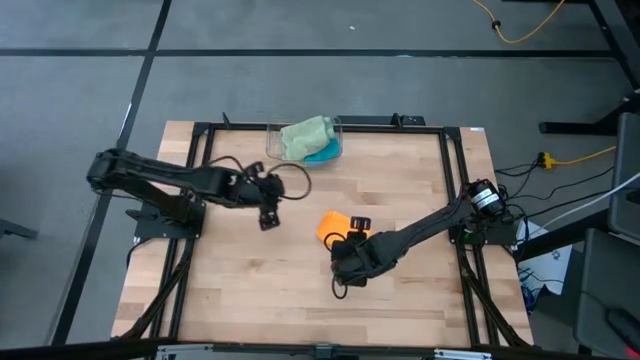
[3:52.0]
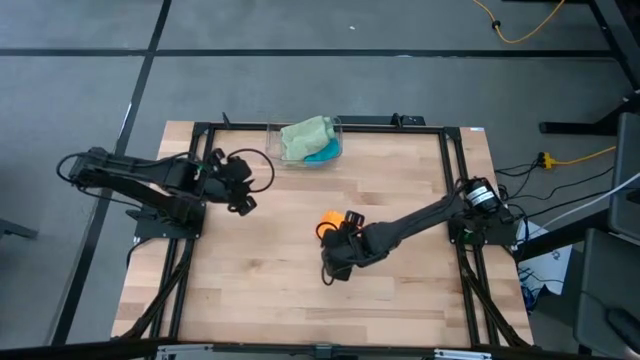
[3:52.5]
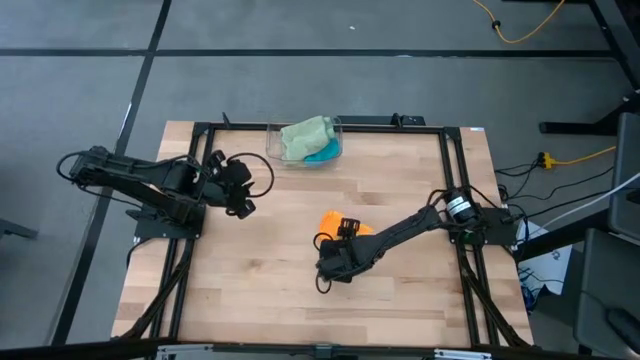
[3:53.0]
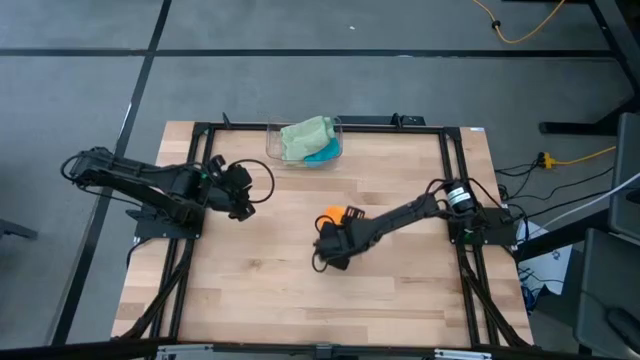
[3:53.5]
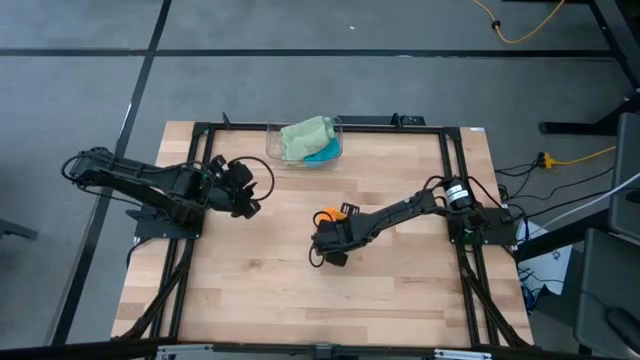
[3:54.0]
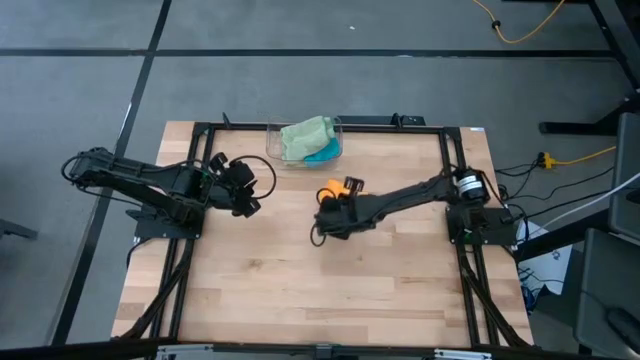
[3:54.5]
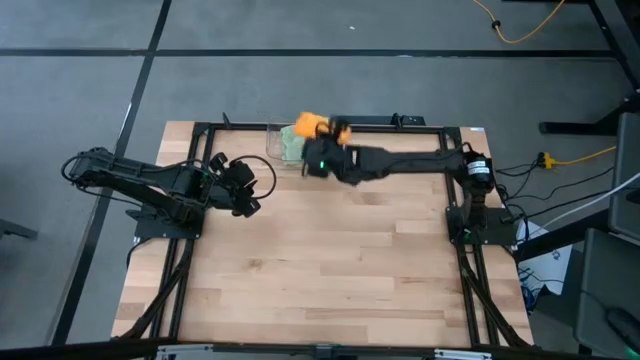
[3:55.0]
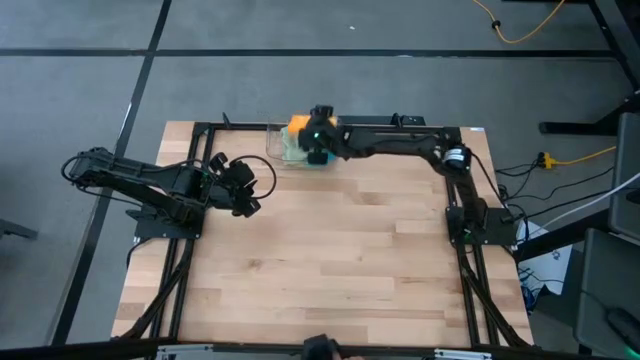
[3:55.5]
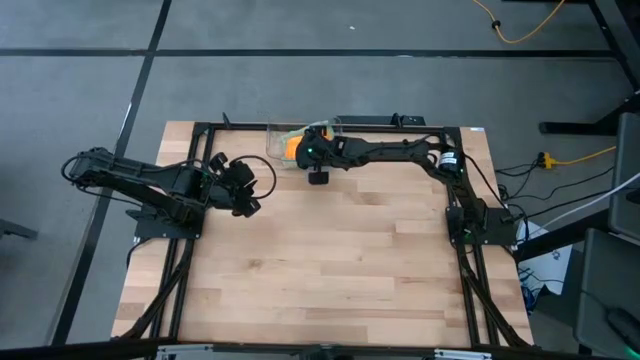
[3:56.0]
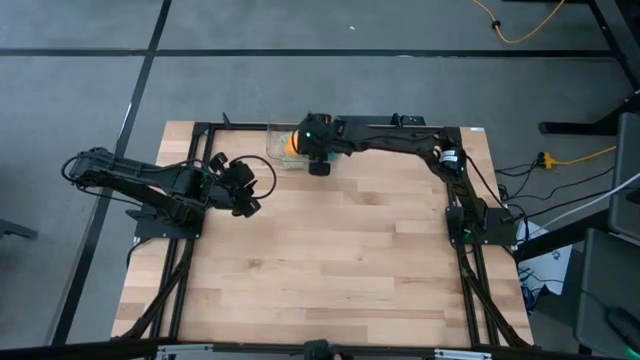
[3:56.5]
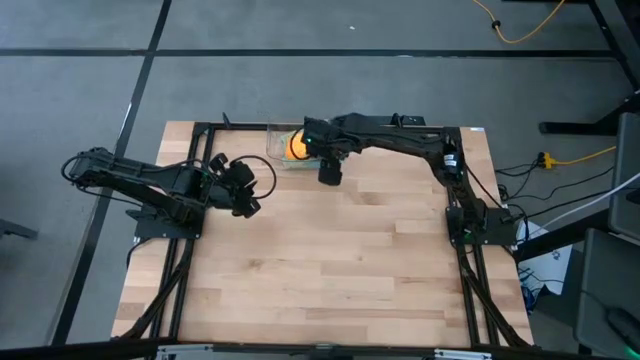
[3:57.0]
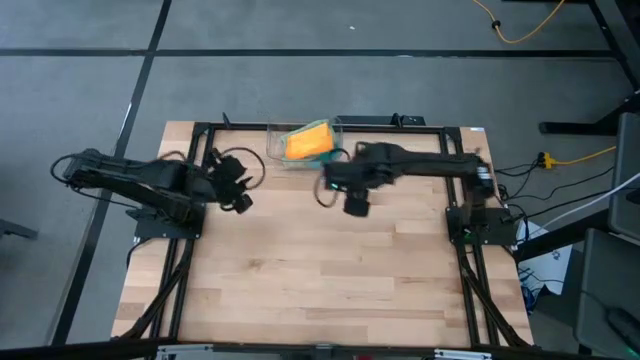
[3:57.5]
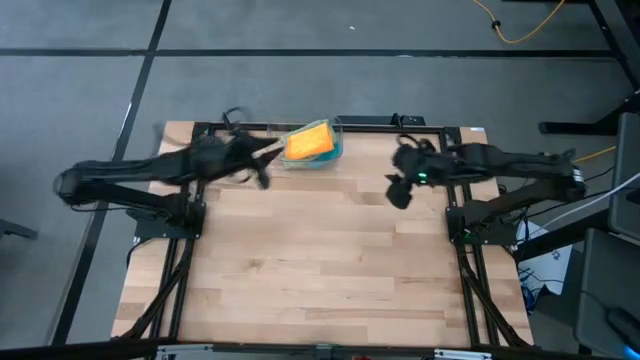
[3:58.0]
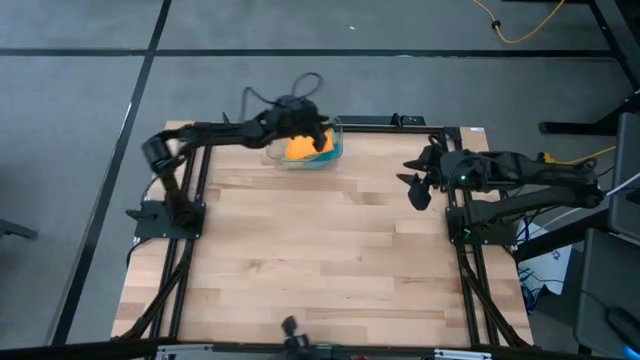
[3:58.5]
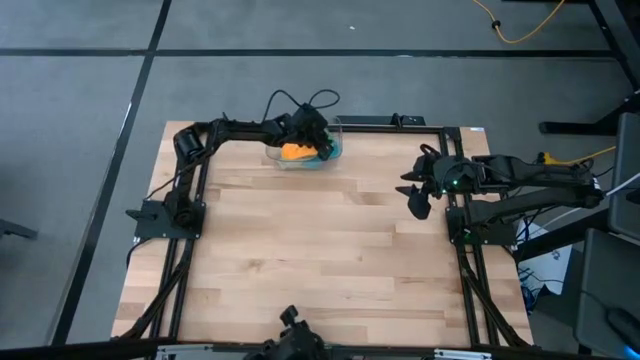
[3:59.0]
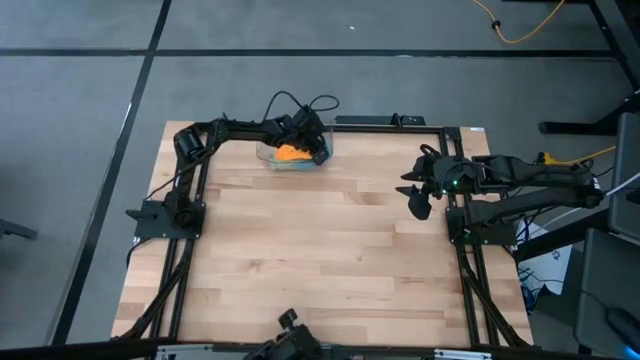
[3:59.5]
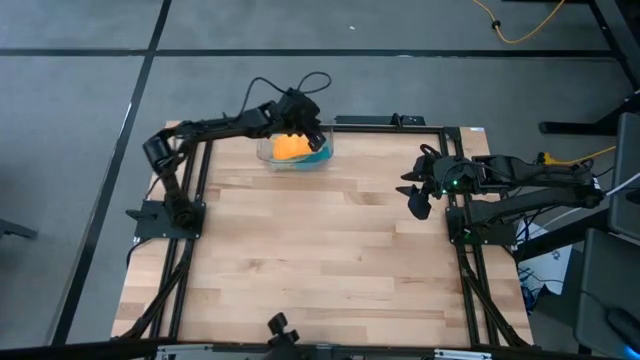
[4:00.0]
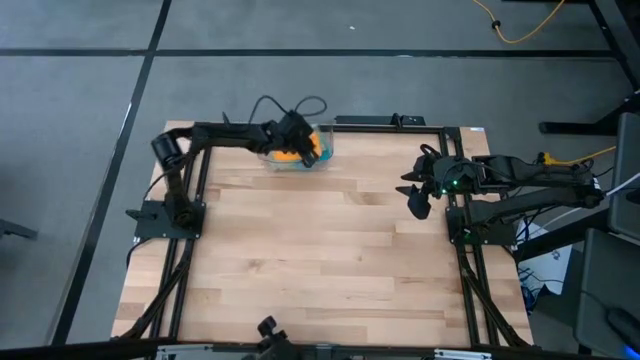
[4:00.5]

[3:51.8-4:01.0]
Task: Fold microfiber towels
Put the orange towel on top of the green towel on the transparent bin

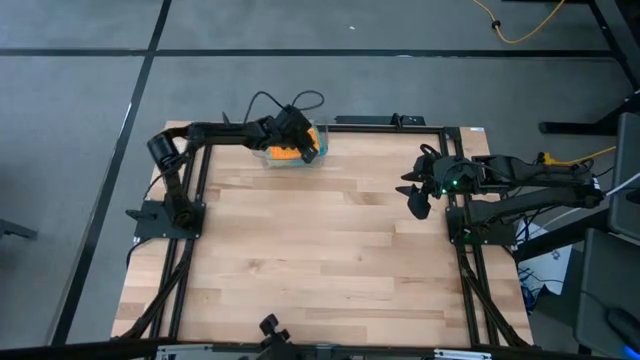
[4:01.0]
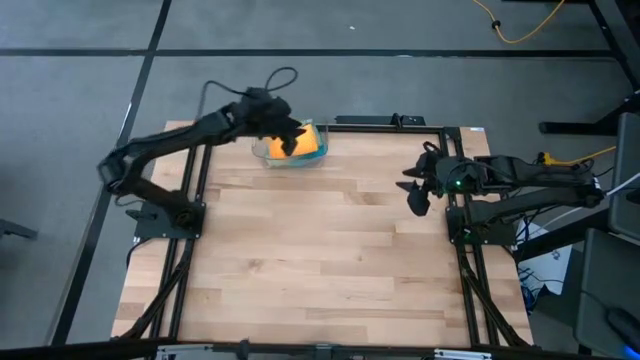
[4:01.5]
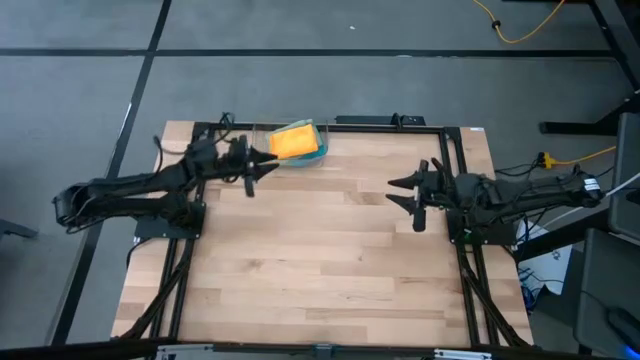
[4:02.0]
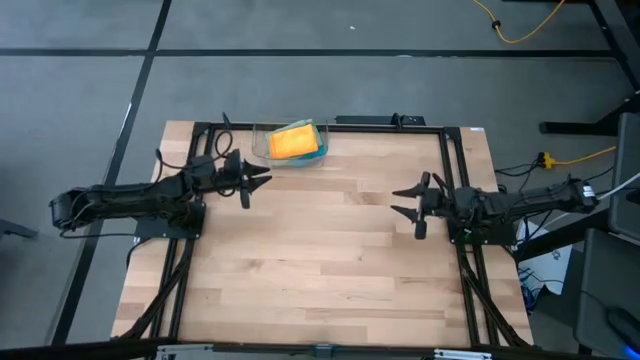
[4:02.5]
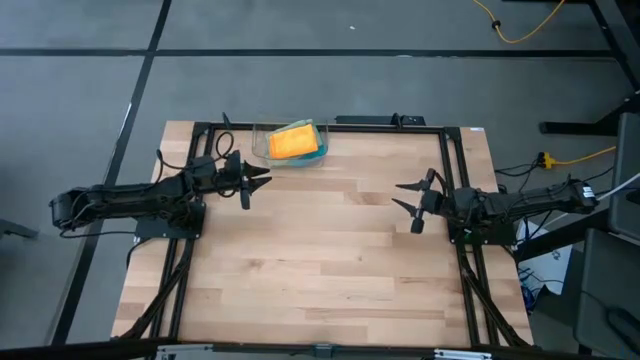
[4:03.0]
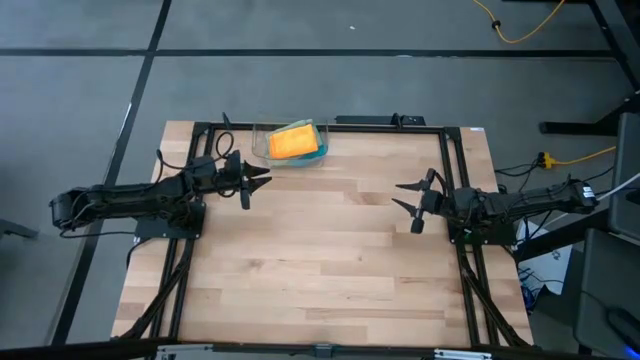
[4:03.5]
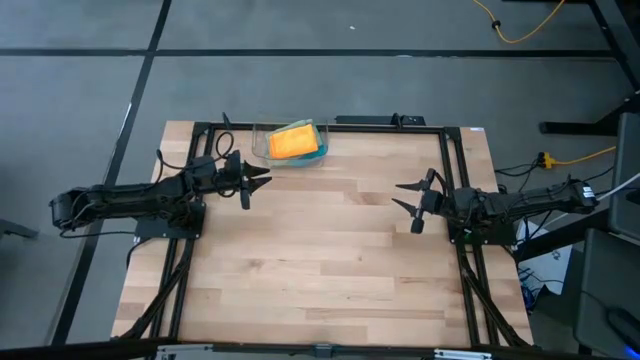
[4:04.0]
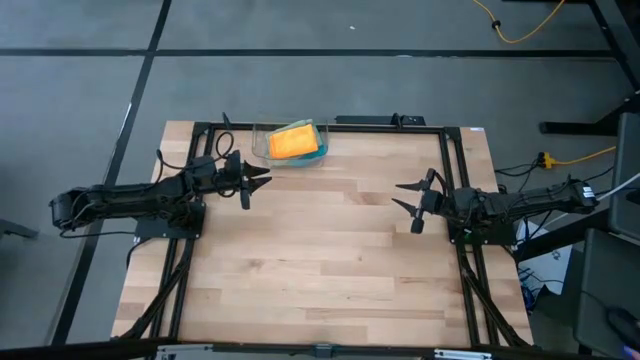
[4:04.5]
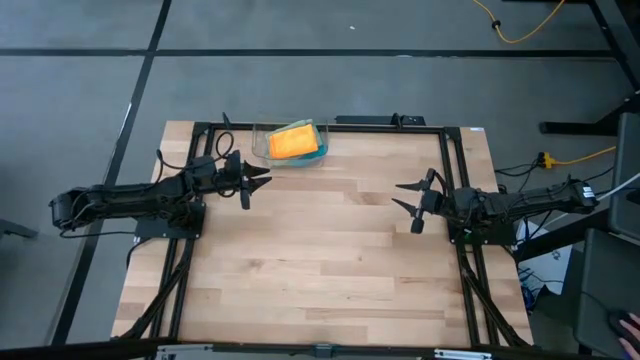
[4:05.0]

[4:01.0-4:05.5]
Return to home position

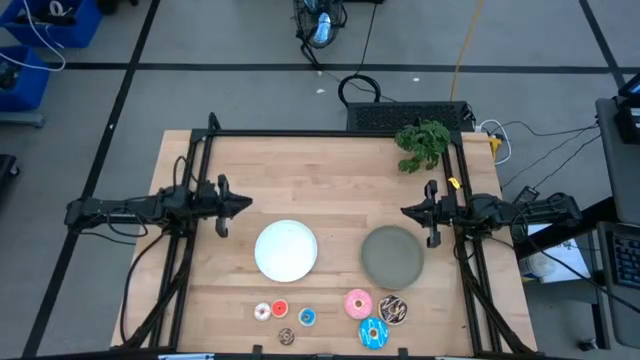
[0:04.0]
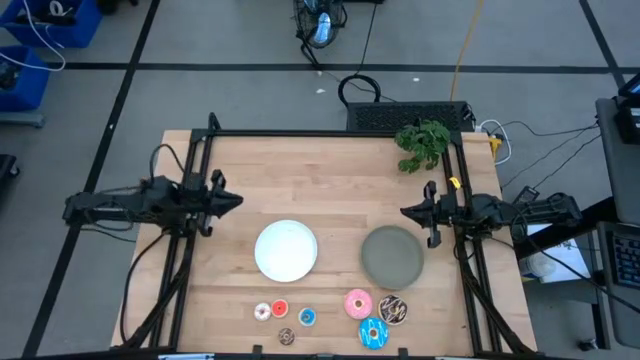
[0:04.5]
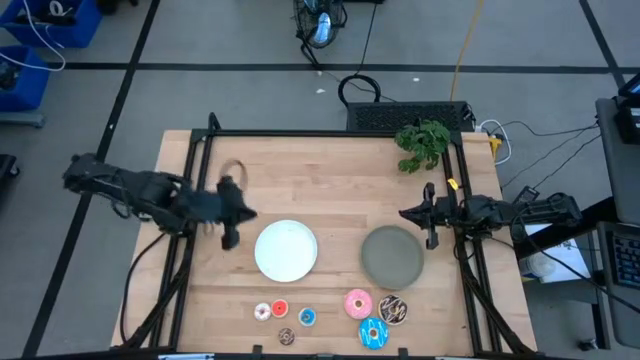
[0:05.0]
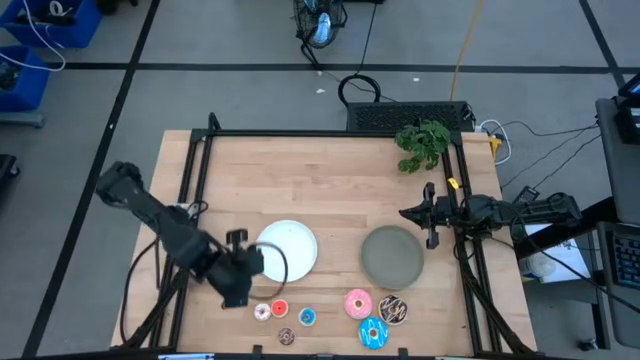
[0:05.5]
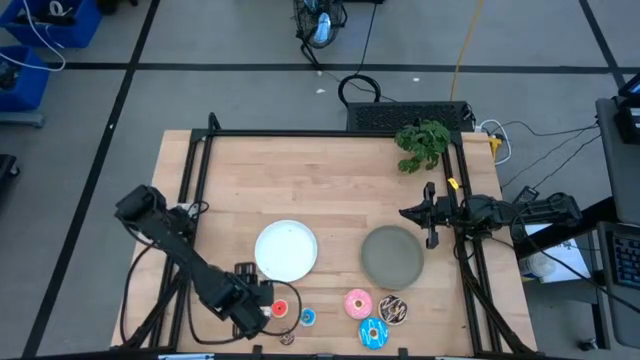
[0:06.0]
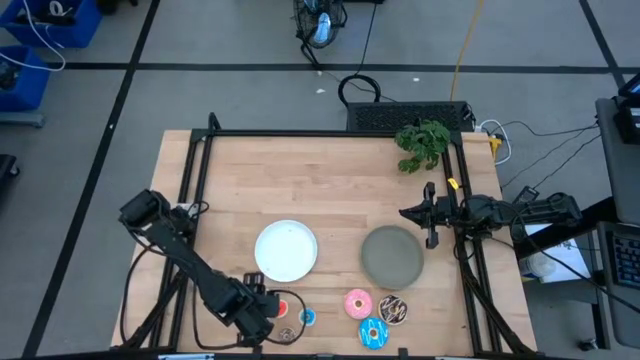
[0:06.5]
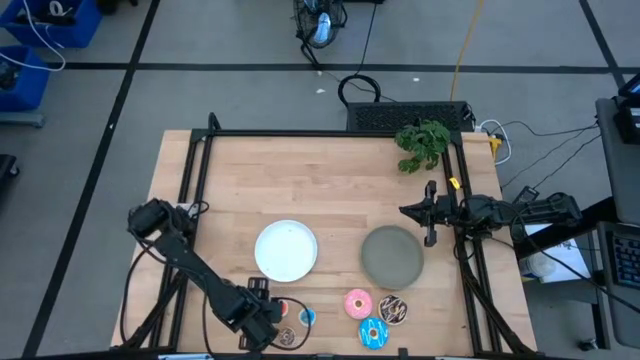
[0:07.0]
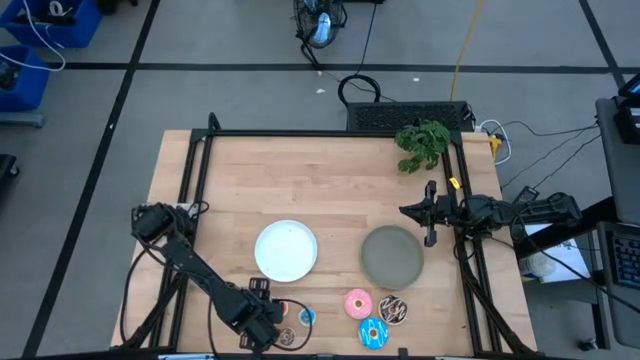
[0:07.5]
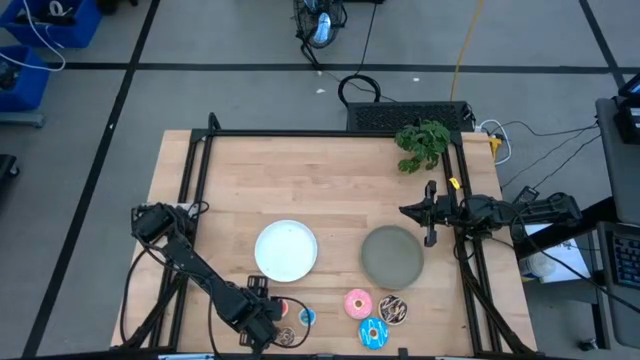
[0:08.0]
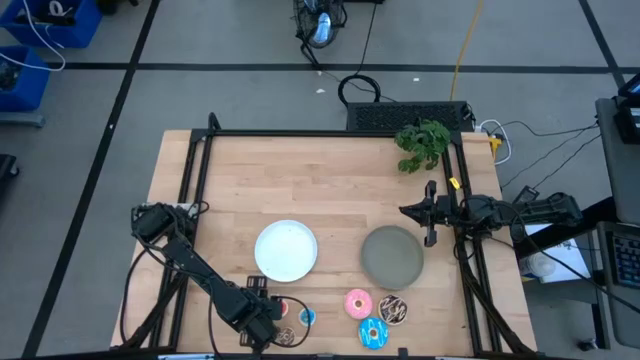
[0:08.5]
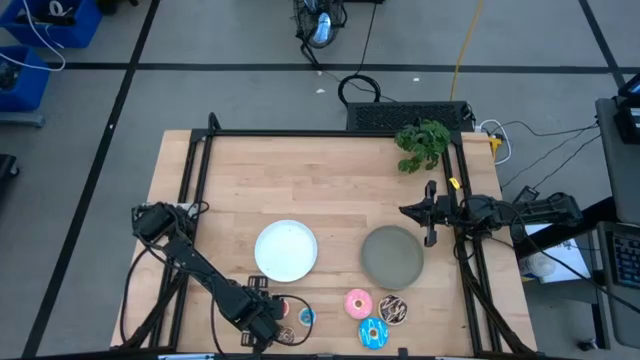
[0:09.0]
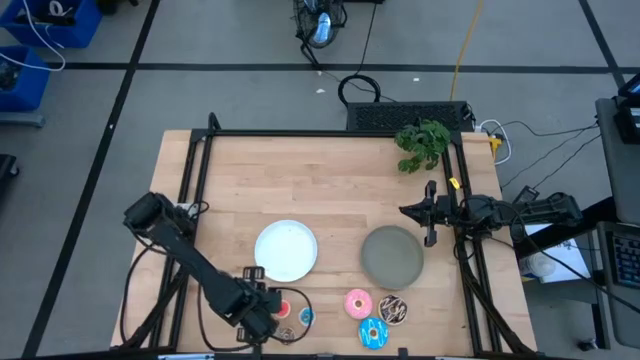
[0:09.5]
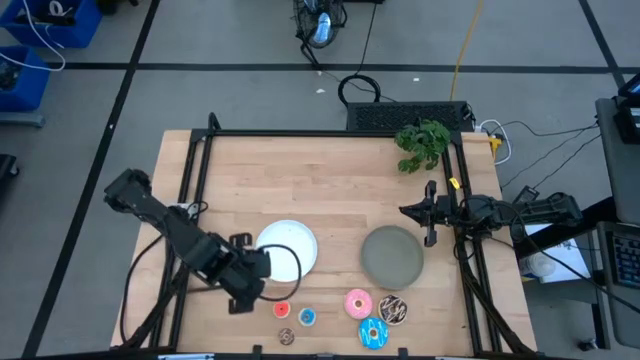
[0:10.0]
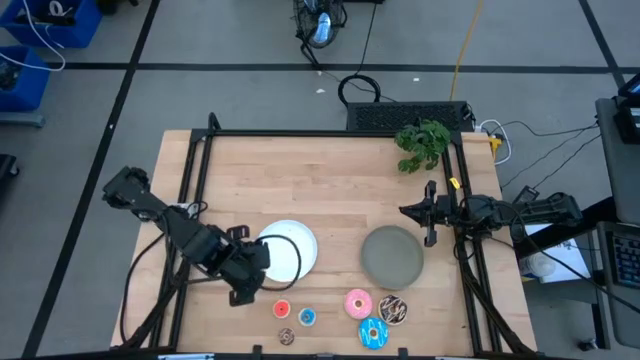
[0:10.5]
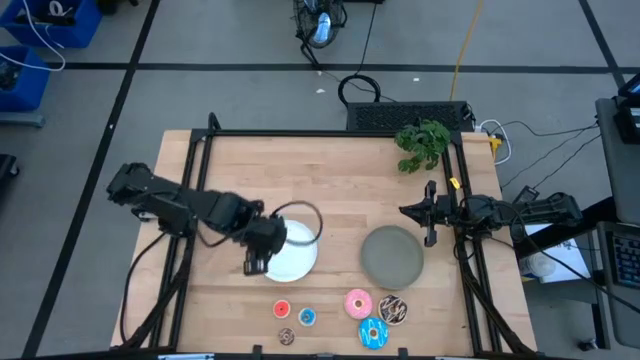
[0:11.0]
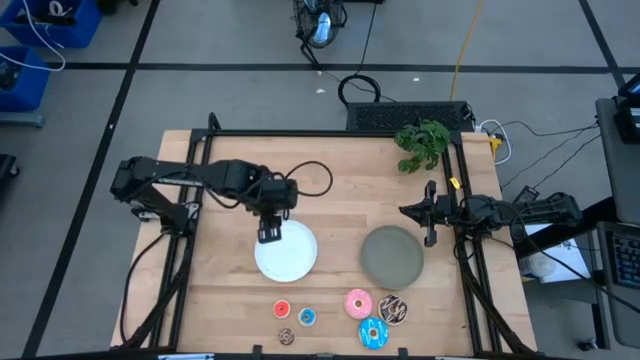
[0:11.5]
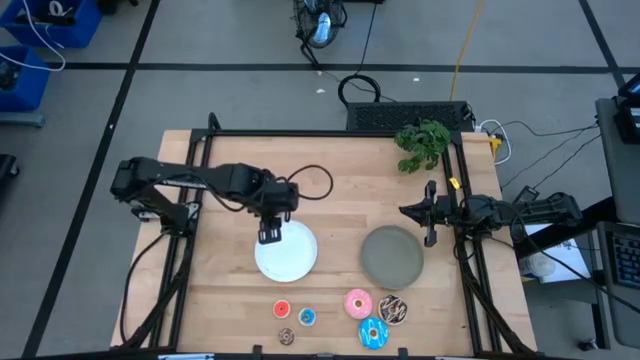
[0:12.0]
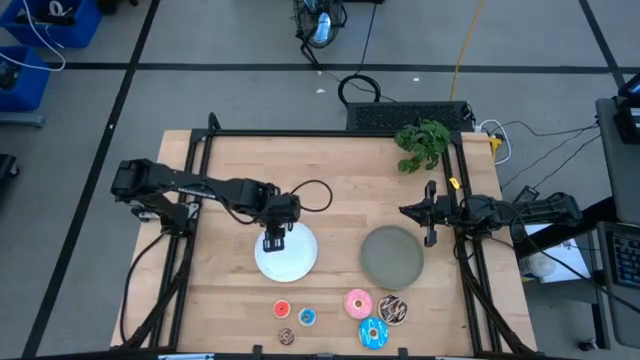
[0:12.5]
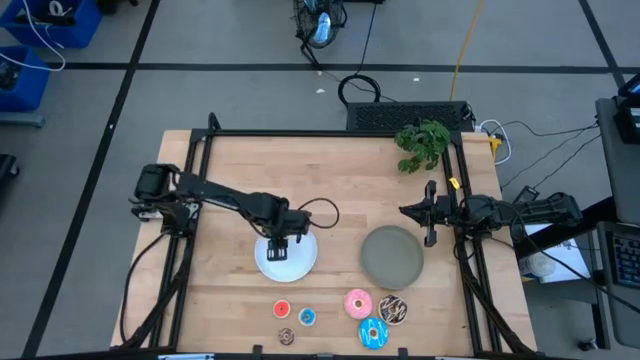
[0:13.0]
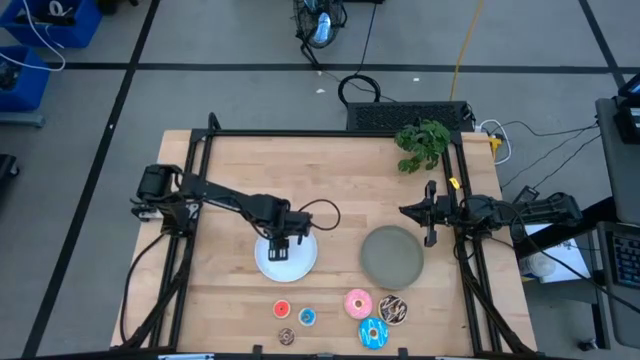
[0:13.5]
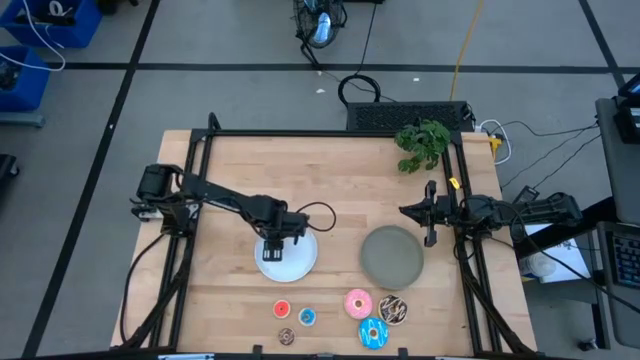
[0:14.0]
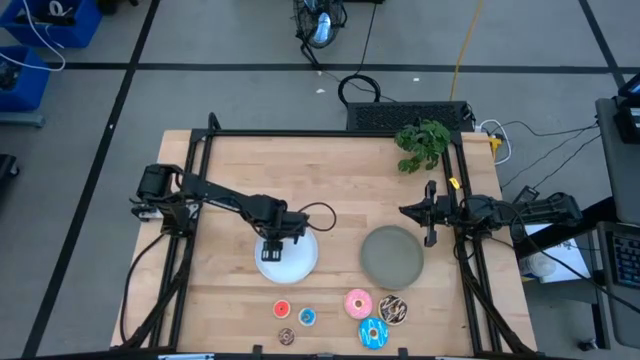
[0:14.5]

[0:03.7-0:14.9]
Task: Pick & Place donuts
Put the small white donut on the white plate
